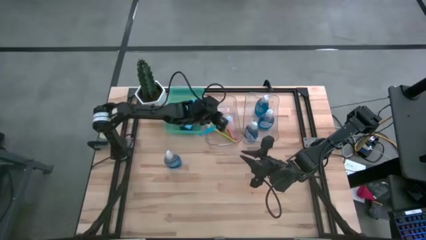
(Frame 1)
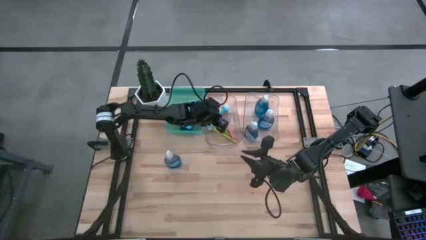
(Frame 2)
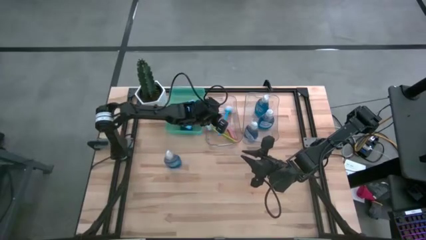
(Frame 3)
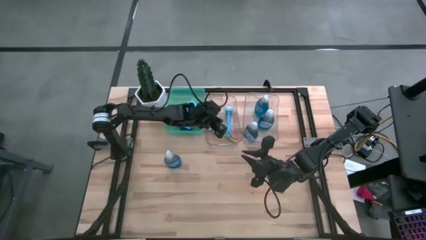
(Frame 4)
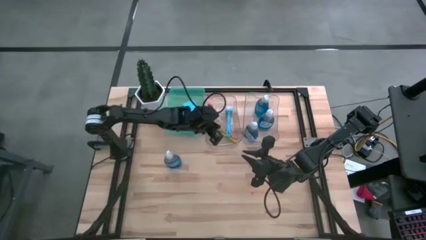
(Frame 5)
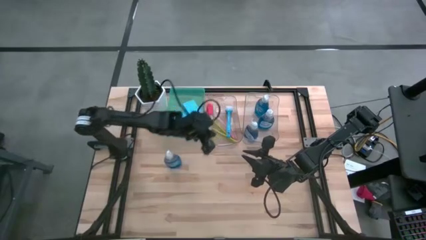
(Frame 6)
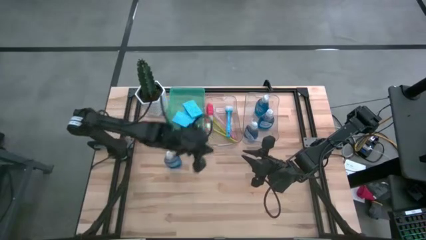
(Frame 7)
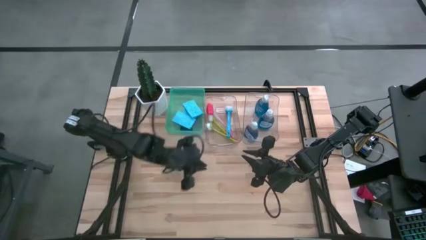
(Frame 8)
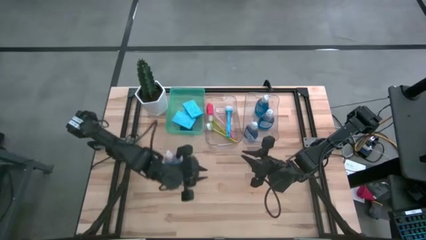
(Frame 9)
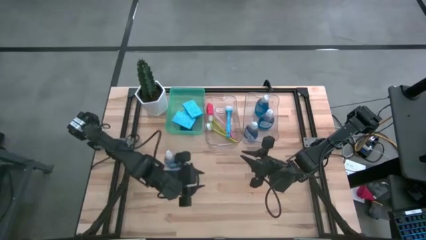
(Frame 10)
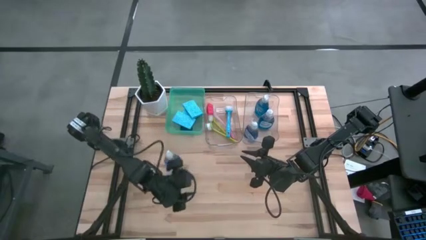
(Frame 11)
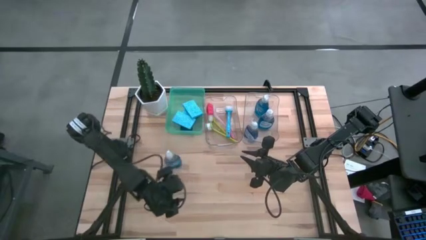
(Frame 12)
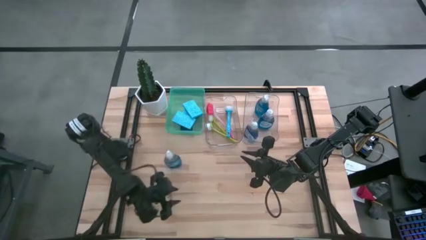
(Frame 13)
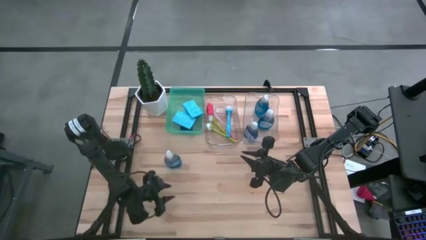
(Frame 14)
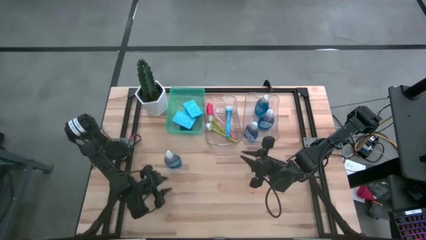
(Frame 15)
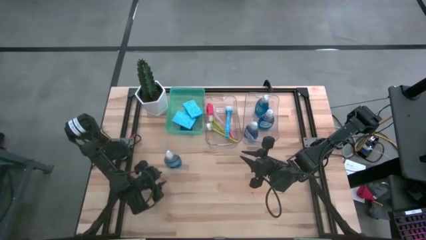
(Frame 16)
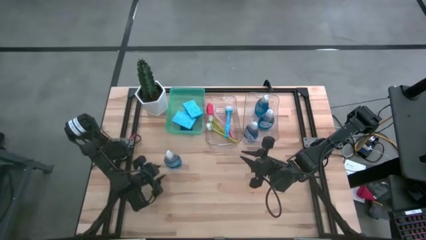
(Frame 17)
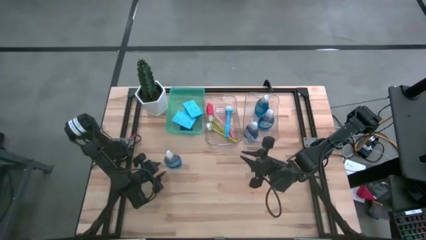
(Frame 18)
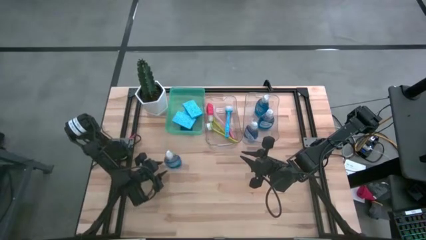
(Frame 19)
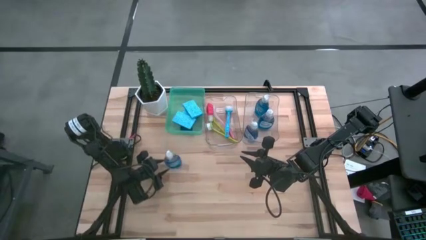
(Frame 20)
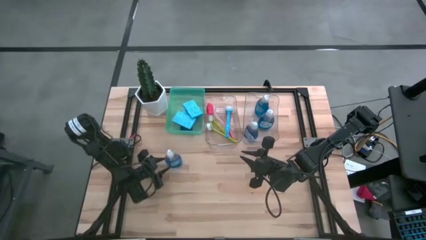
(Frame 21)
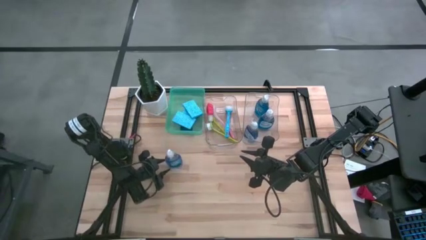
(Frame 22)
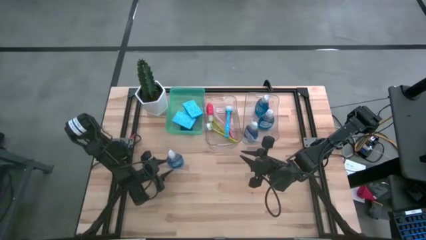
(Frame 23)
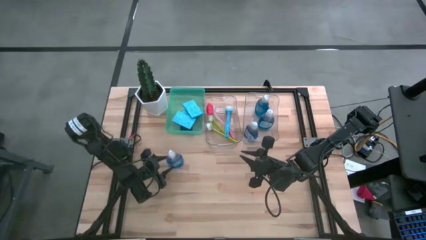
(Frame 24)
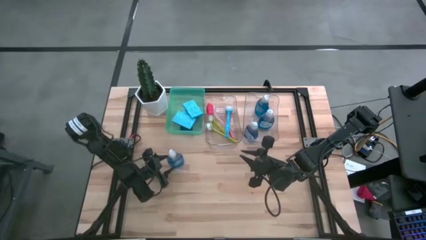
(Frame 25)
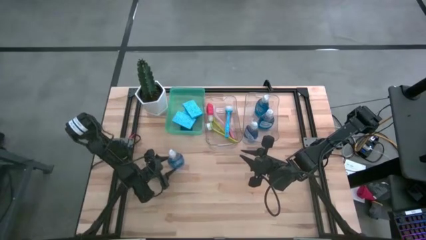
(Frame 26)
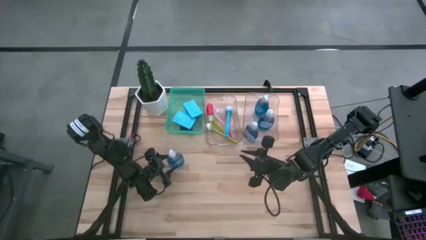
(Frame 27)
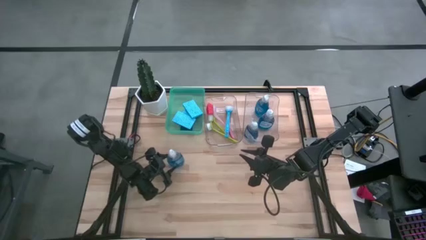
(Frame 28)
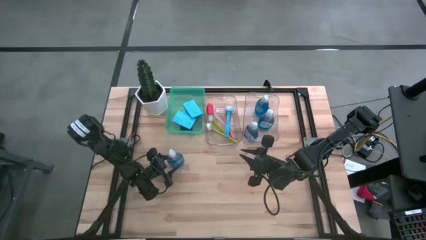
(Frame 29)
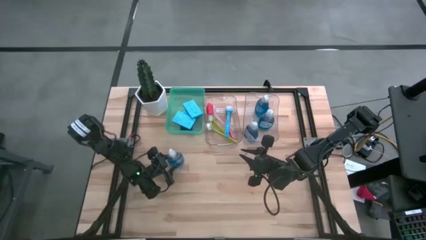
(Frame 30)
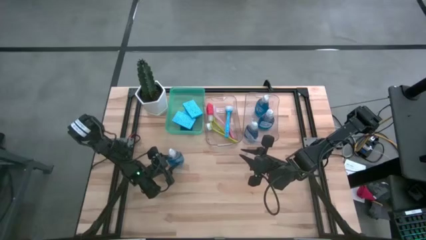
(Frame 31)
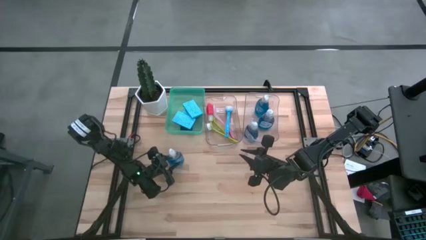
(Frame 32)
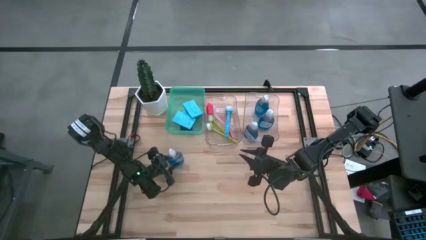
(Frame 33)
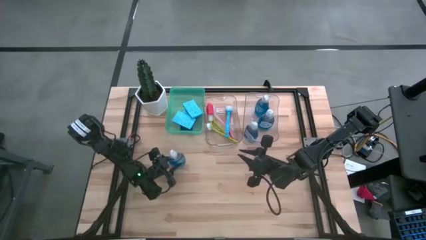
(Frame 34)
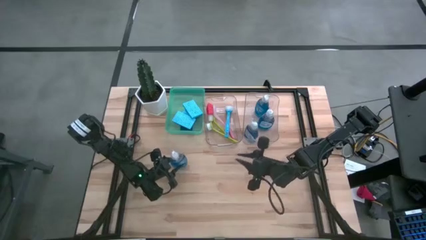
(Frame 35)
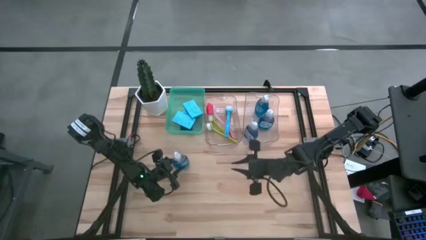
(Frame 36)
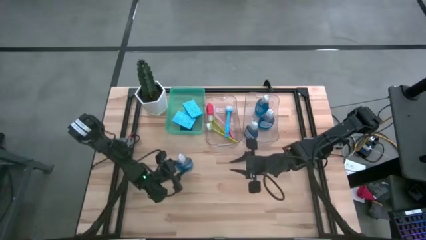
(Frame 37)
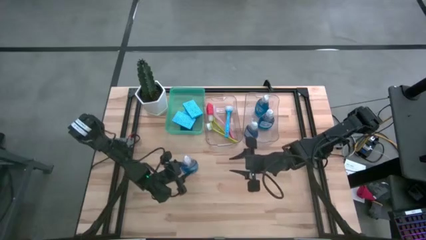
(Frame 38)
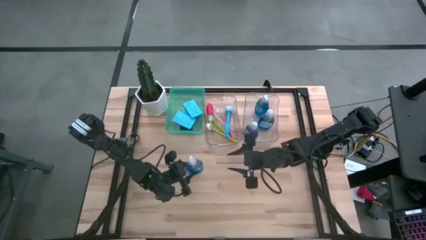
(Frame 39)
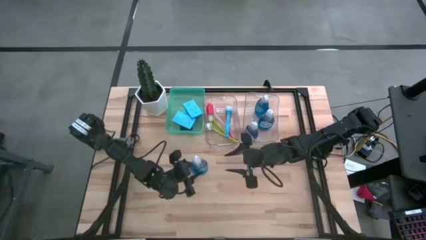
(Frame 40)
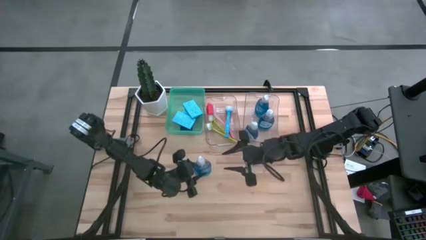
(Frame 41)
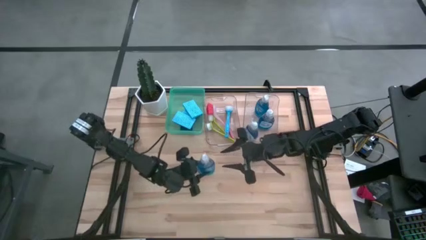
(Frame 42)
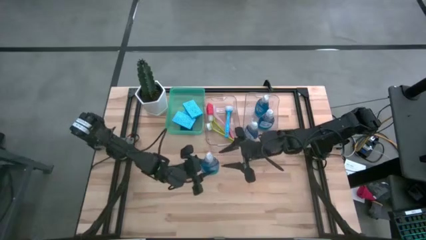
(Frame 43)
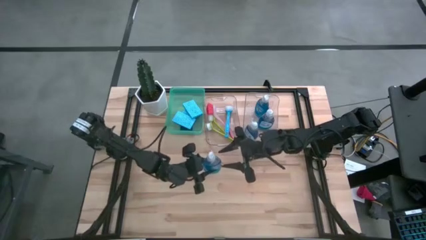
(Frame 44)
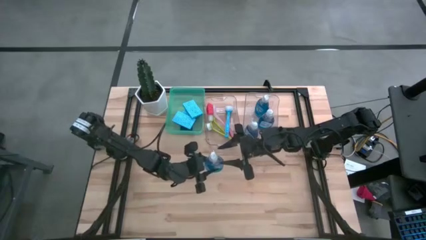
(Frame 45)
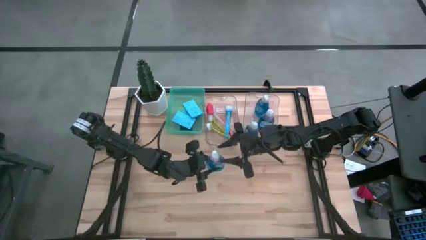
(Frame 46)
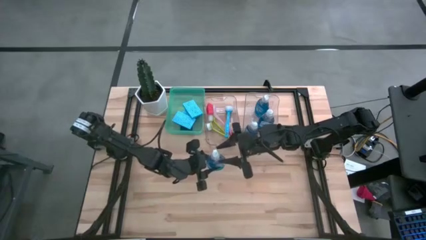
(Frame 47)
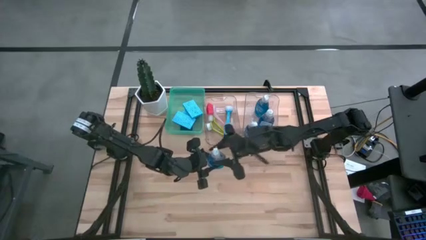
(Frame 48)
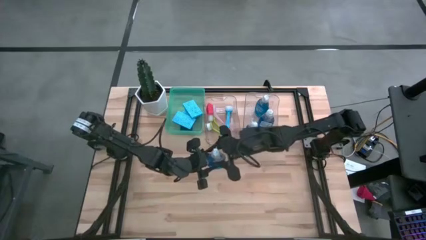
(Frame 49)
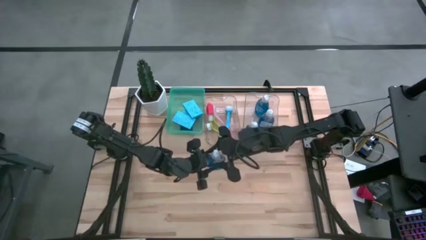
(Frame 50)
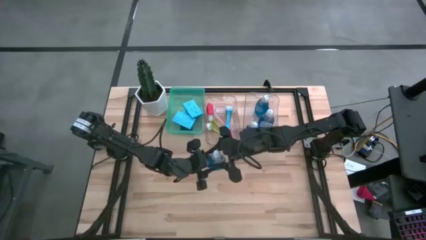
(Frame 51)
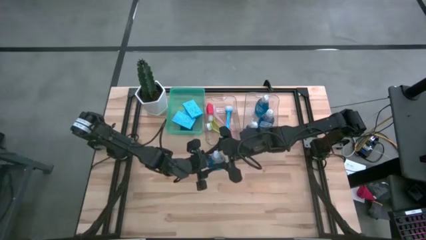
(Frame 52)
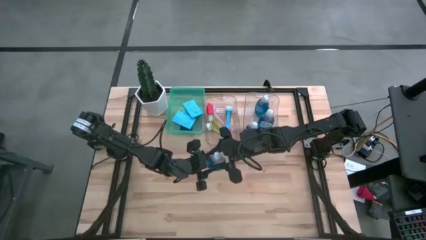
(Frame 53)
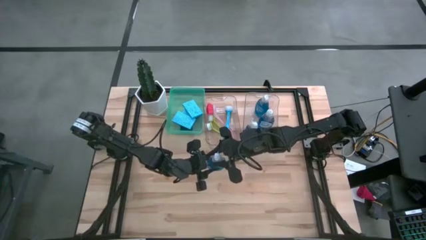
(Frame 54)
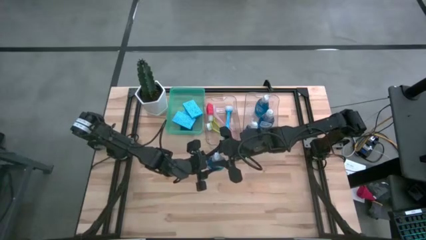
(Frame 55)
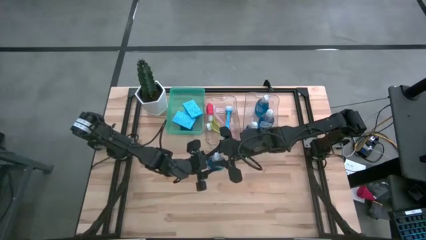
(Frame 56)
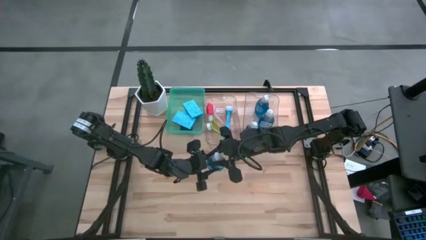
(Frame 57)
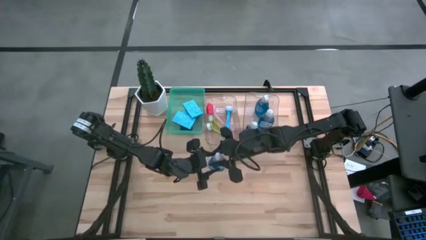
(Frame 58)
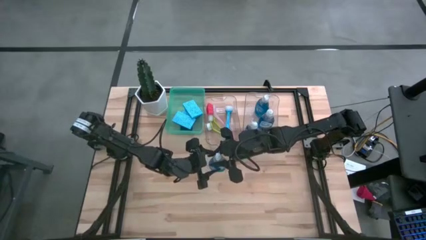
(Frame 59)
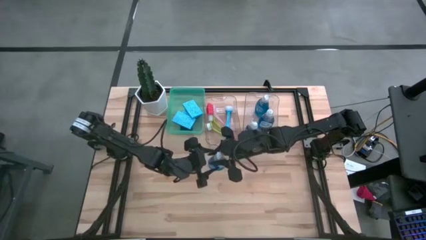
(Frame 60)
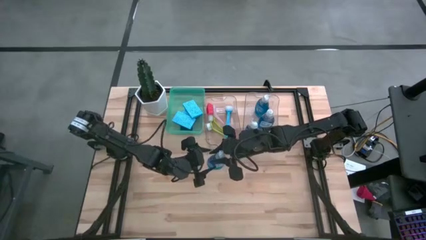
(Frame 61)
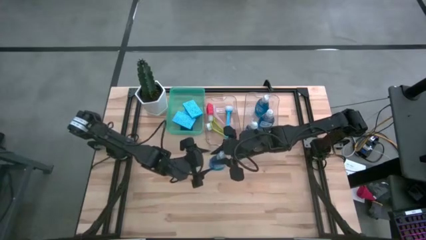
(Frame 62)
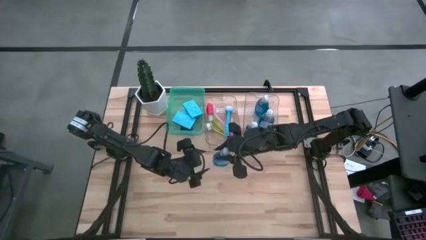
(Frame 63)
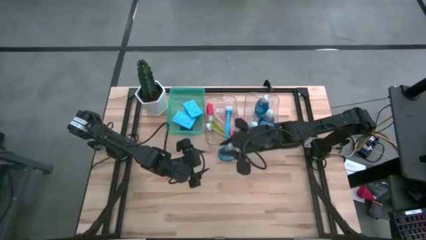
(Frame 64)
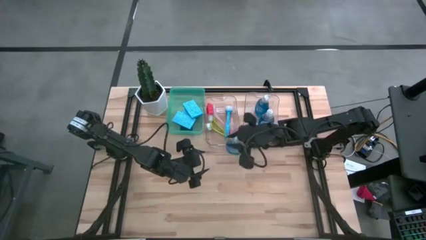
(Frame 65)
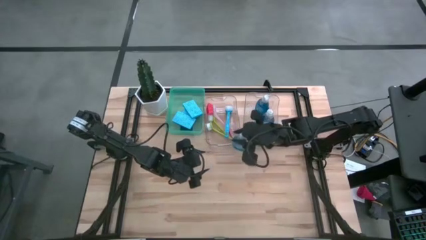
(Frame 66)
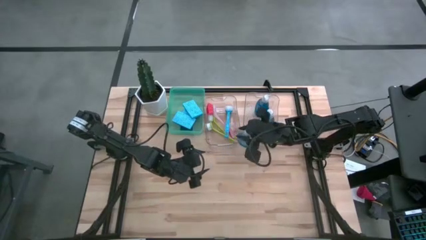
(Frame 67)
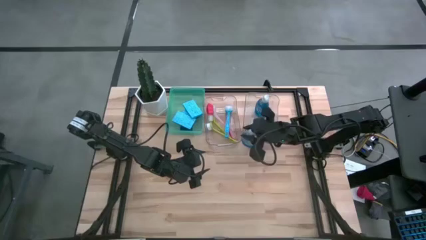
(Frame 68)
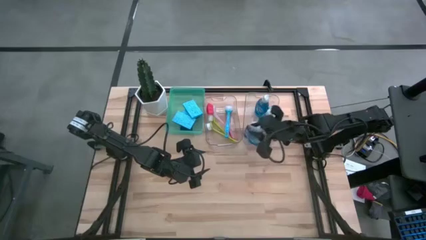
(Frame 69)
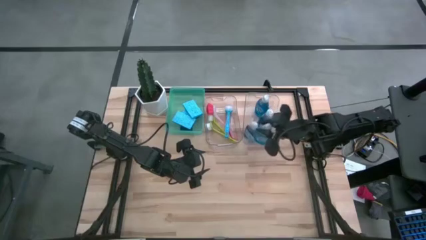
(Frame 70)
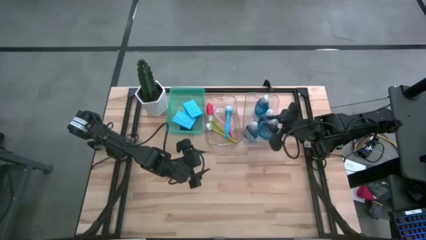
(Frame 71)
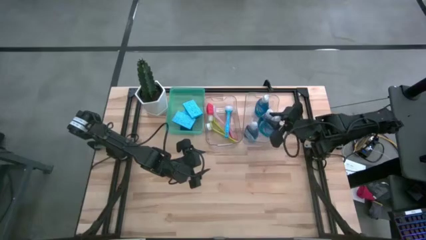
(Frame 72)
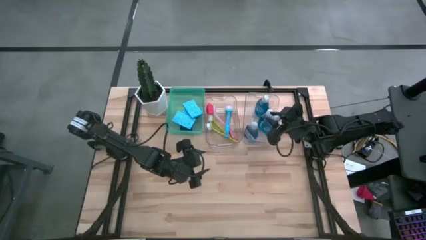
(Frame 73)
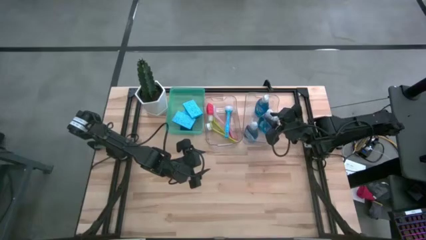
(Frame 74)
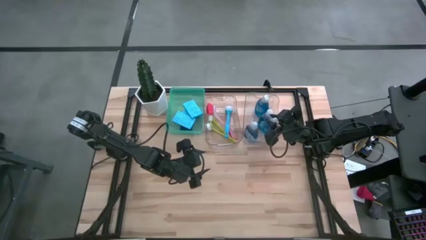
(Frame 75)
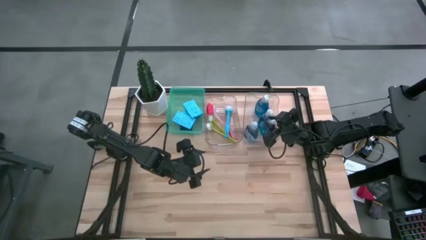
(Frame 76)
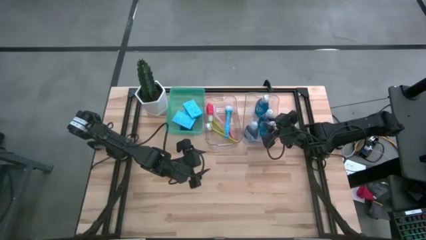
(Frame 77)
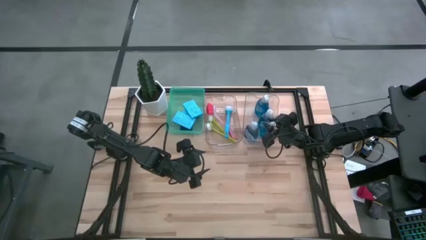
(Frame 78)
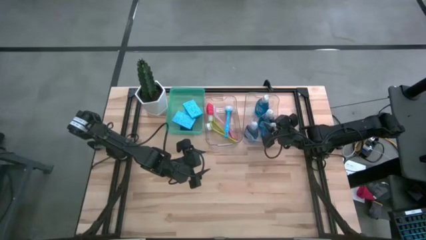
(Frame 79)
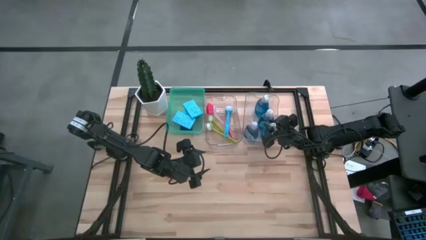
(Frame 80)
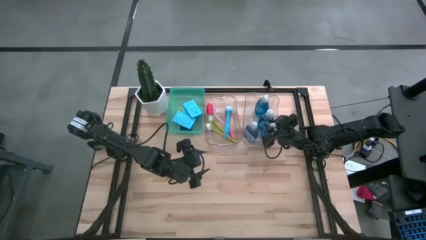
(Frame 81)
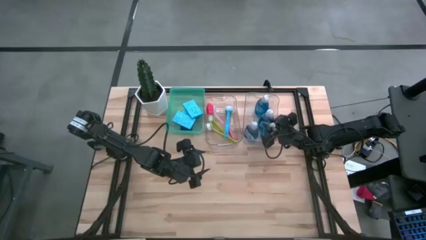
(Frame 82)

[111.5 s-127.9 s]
Task: Pick & Place Kitchen Sink Supplies
Put the blue dishwashing liquid bottle into the right transparent bin
